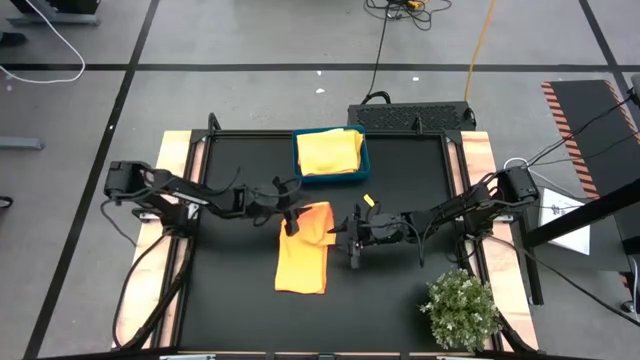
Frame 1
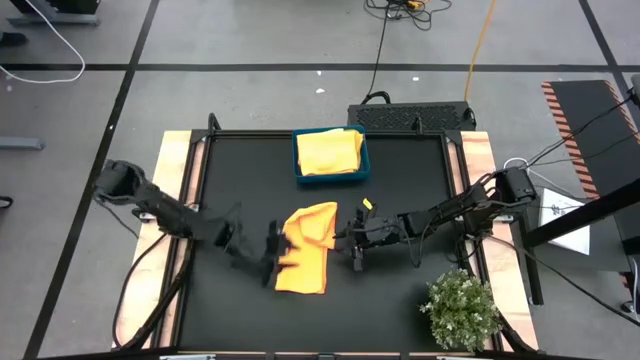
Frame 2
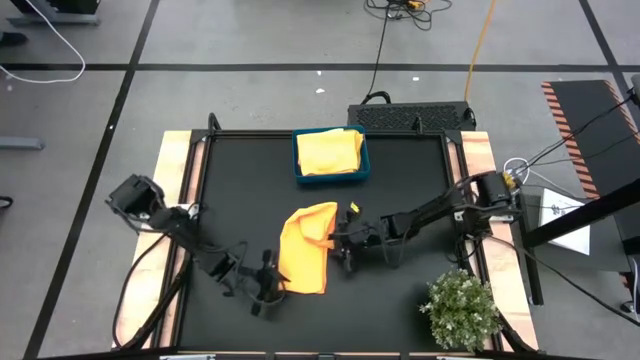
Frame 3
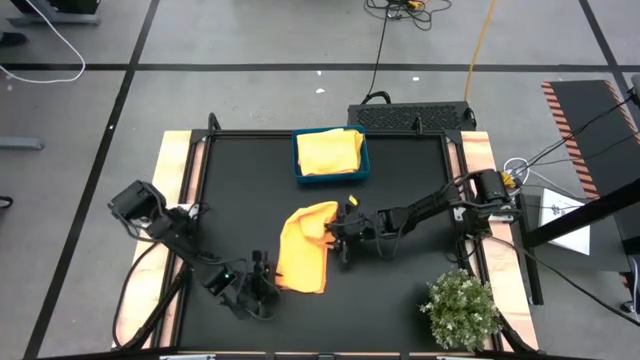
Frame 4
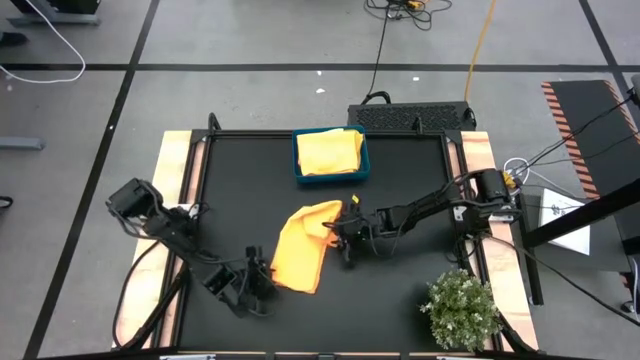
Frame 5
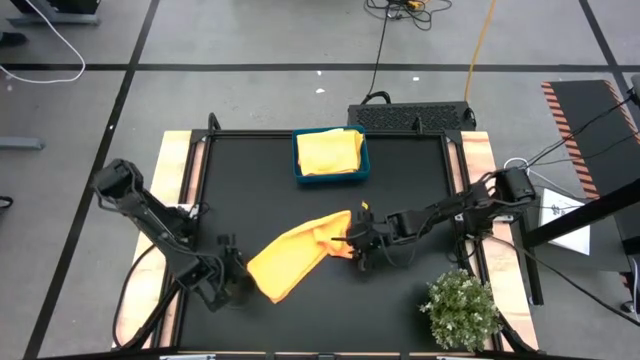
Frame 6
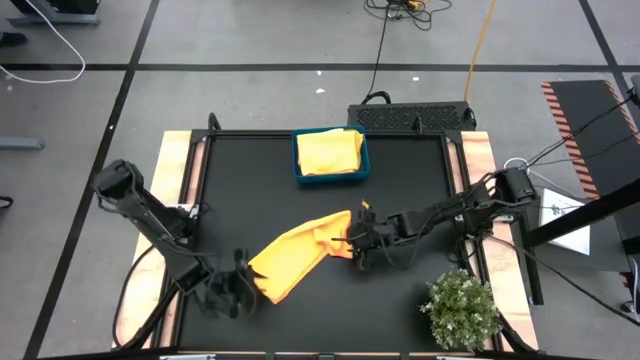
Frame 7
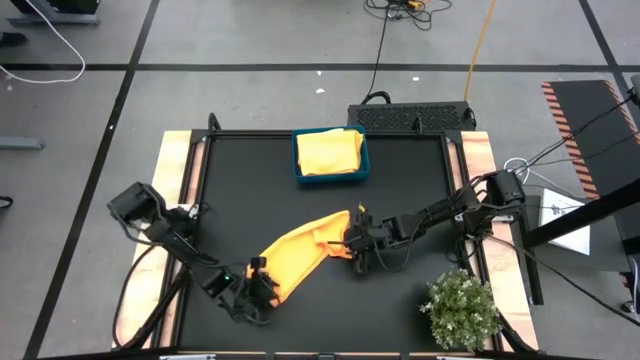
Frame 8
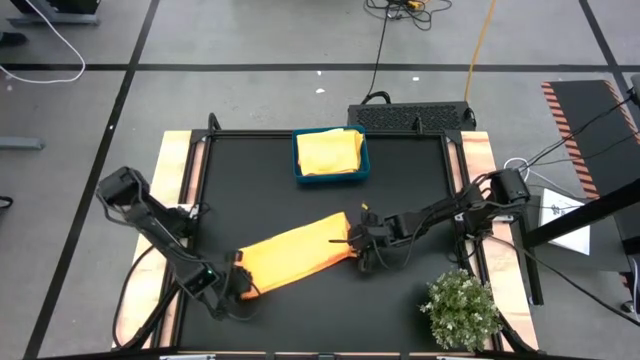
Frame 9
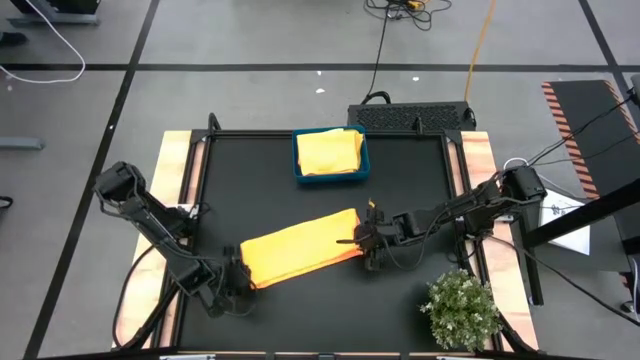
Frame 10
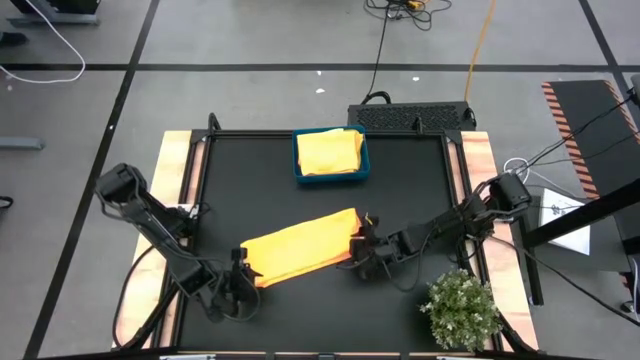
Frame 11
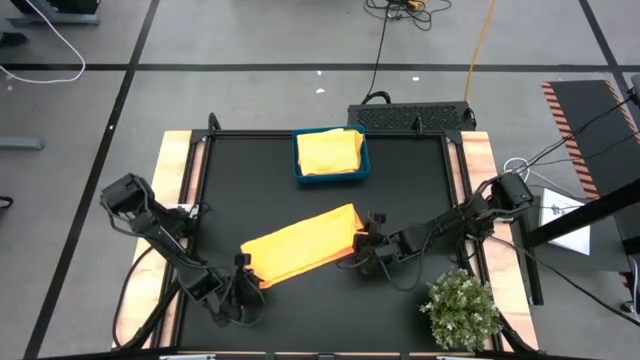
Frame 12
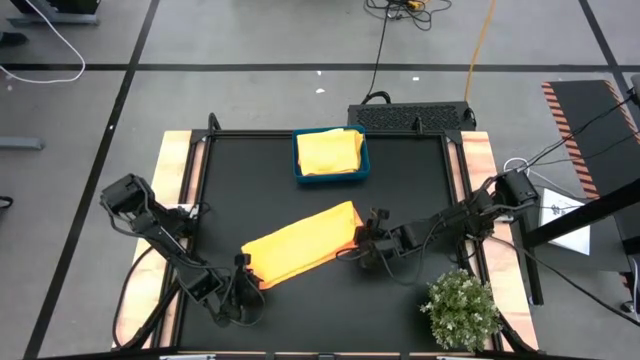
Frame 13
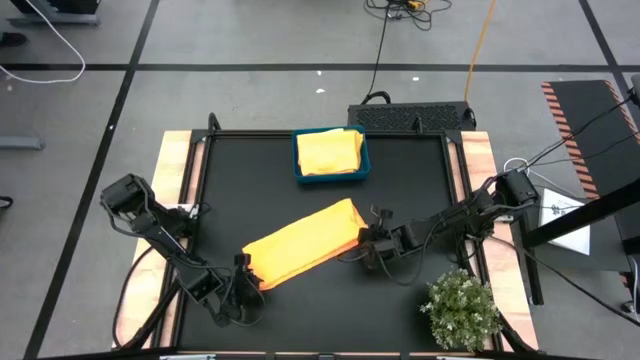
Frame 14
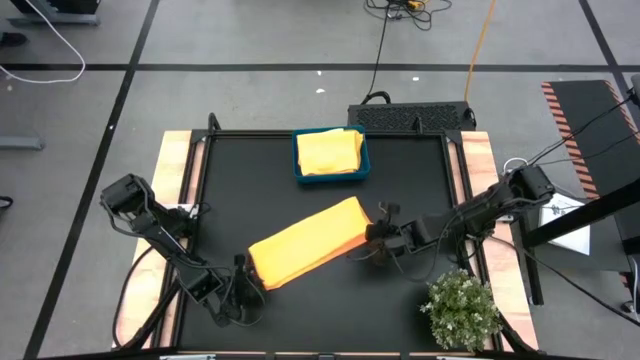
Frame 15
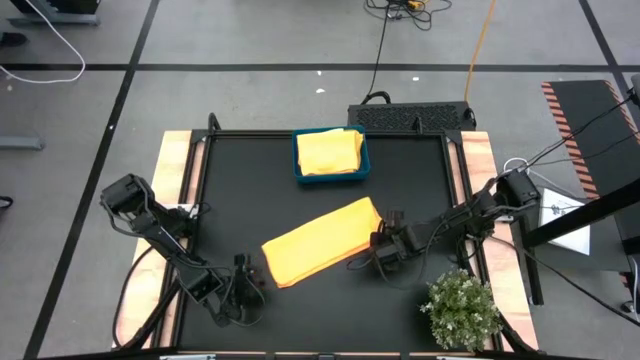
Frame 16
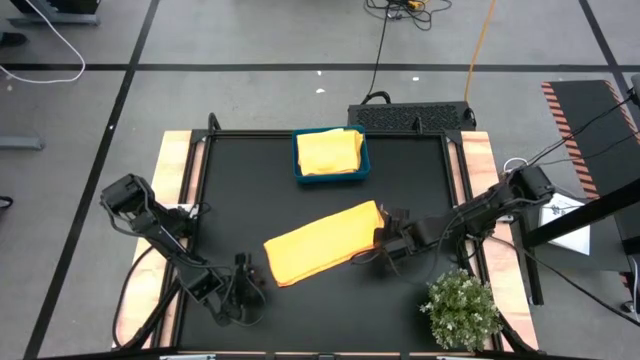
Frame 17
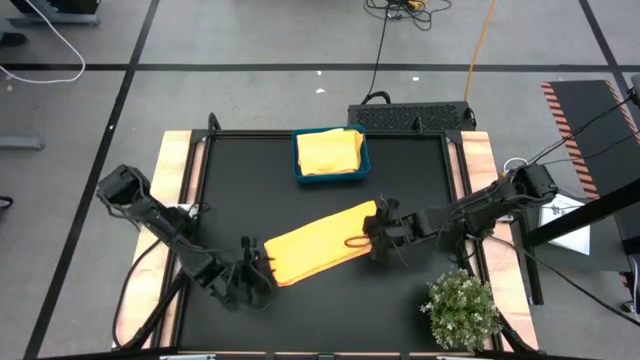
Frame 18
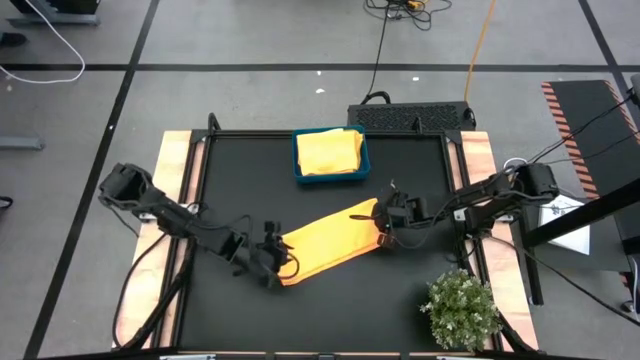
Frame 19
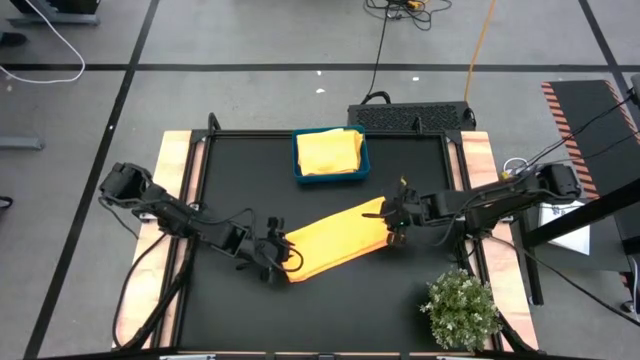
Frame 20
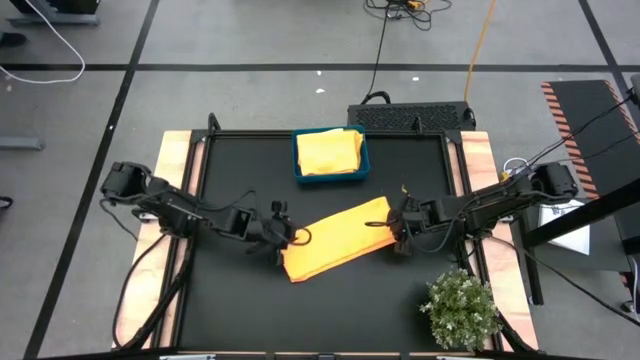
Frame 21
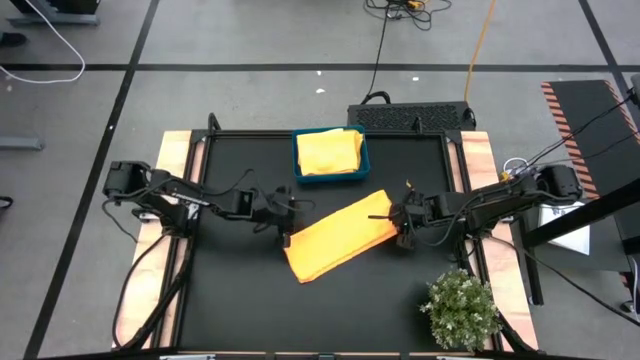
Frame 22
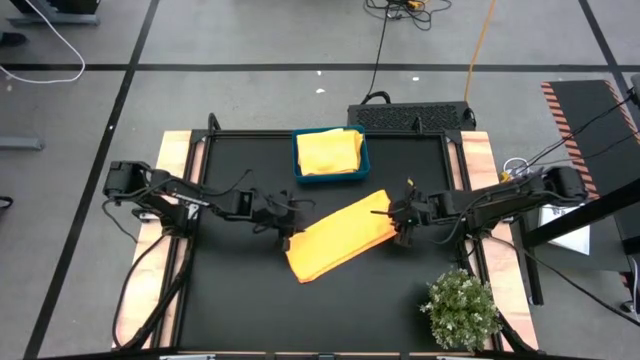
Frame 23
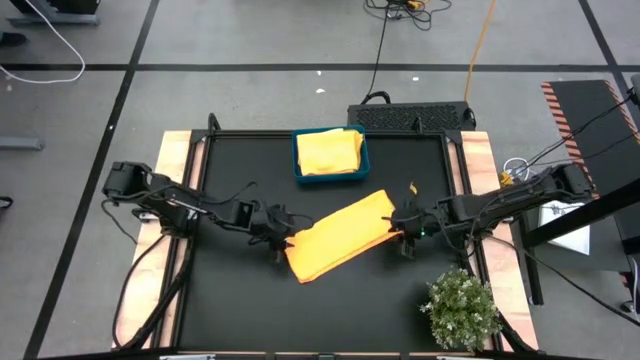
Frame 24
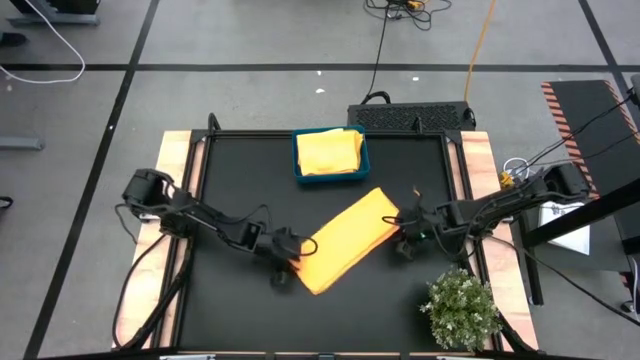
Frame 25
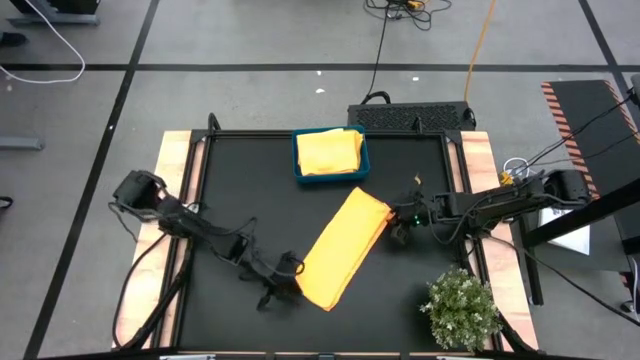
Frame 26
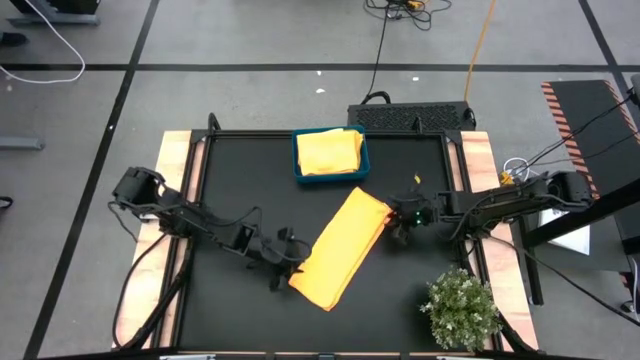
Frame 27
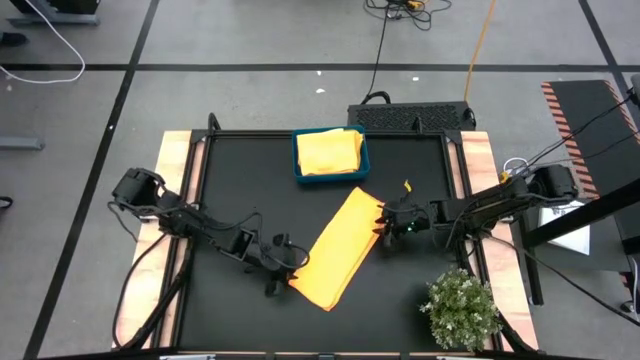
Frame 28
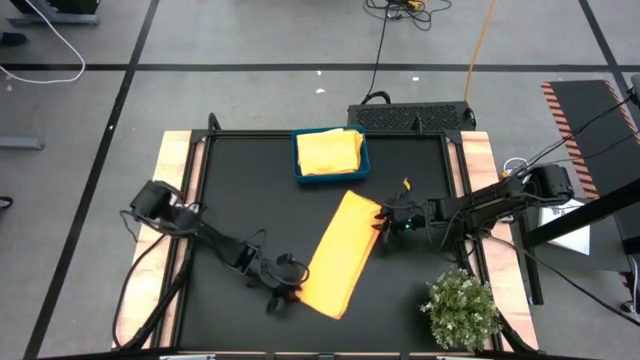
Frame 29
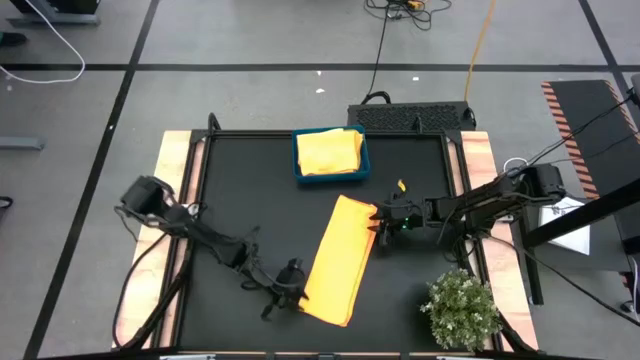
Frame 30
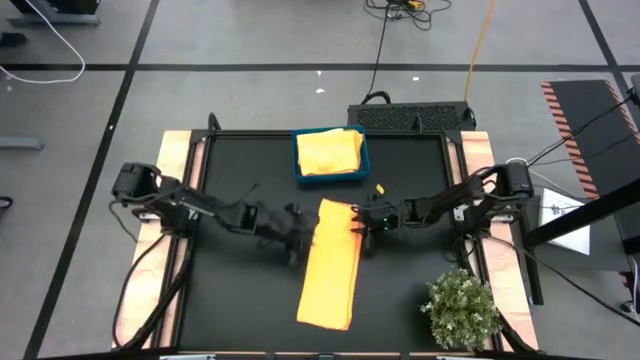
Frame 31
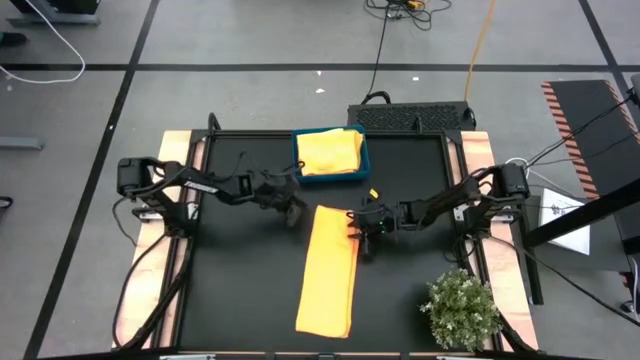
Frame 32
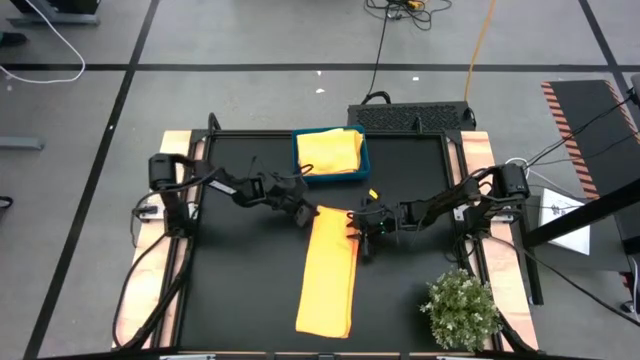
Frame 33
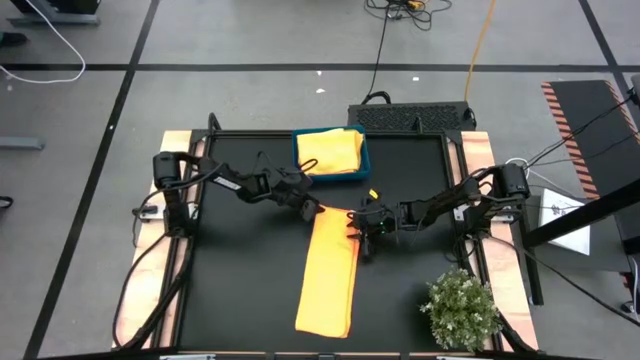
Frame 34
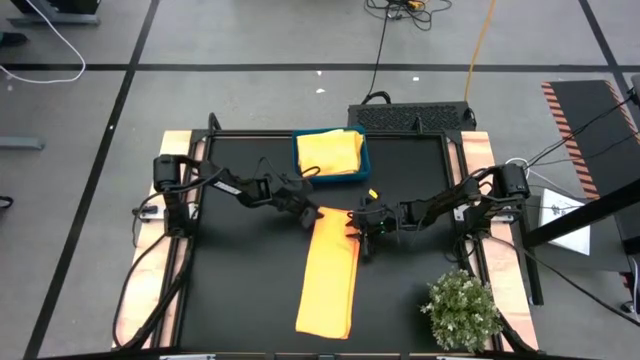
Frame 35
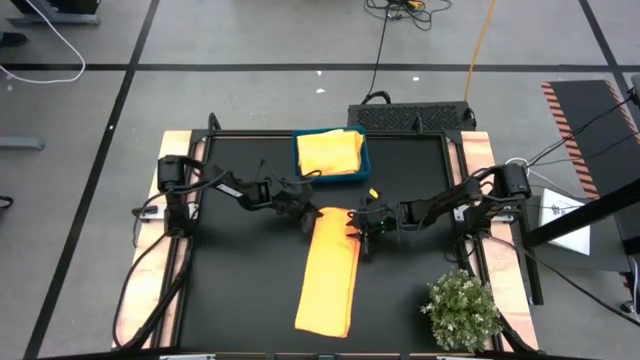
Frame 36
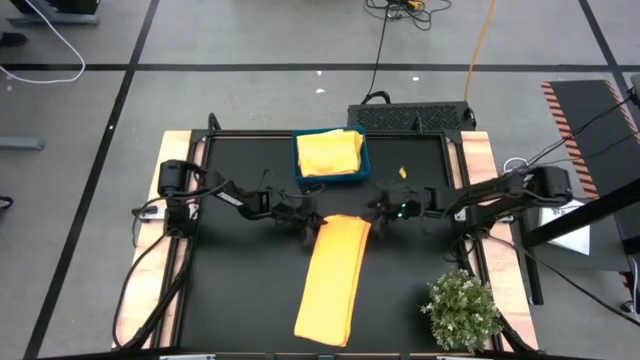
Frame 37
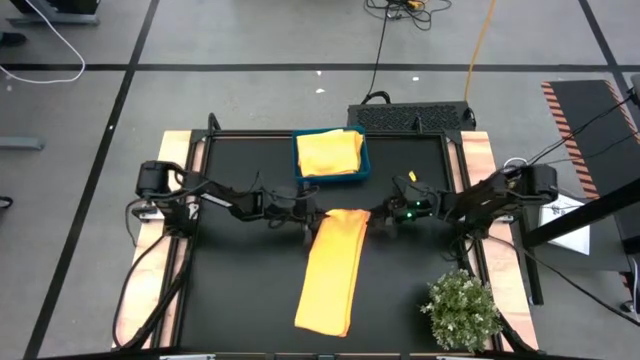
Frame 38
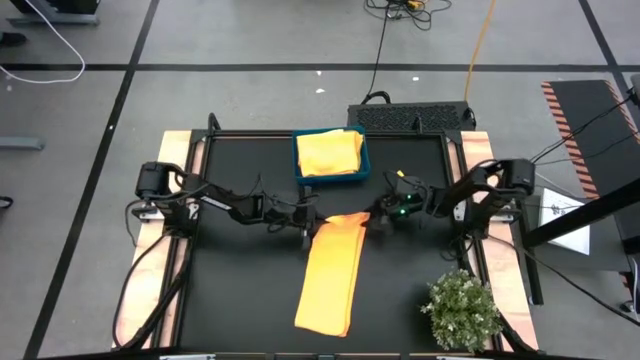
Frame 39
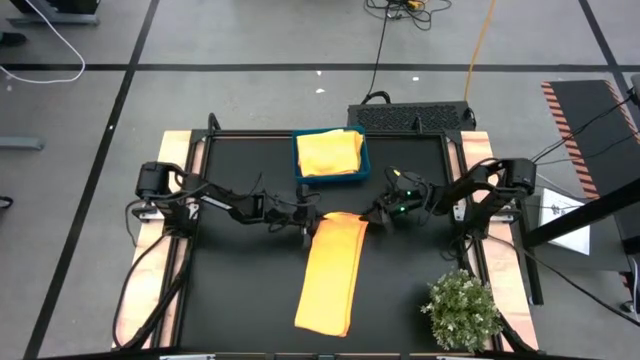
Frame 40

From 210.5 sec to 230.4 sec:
Task: Fold microfiber towels
Fold the folded orange microfiber towel

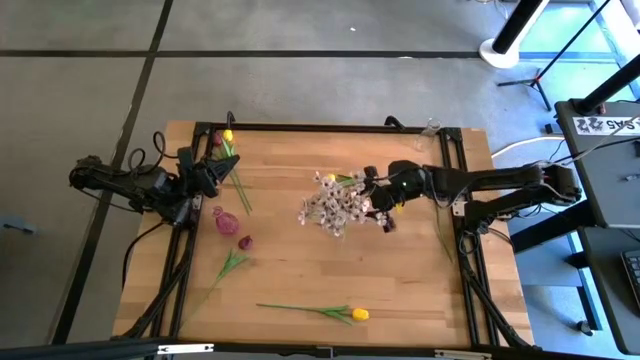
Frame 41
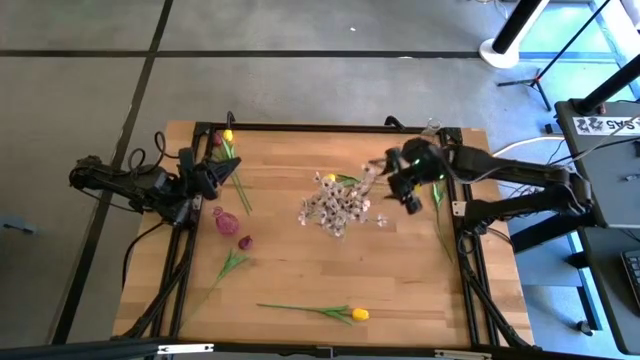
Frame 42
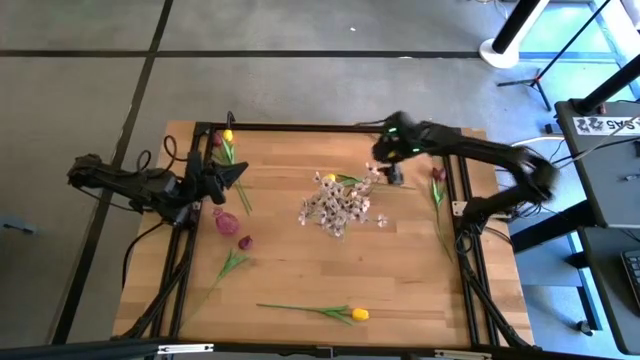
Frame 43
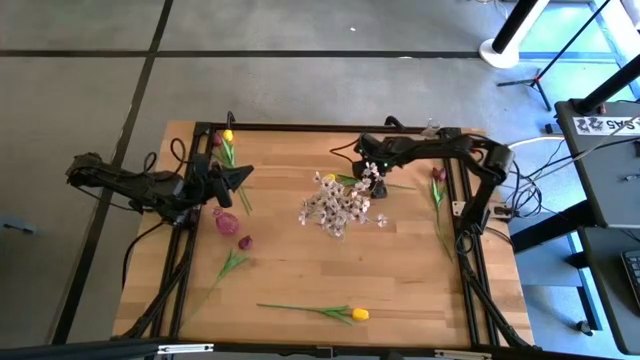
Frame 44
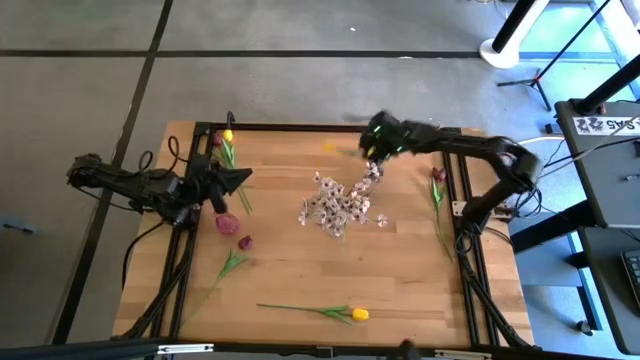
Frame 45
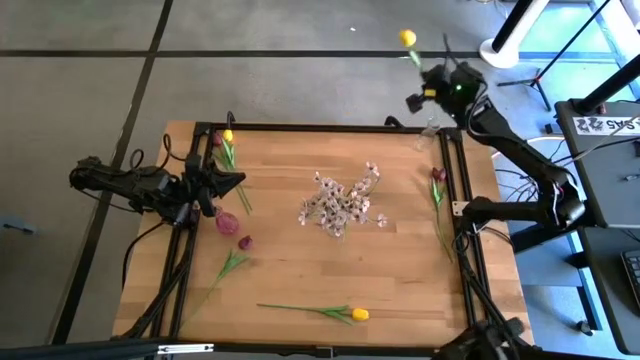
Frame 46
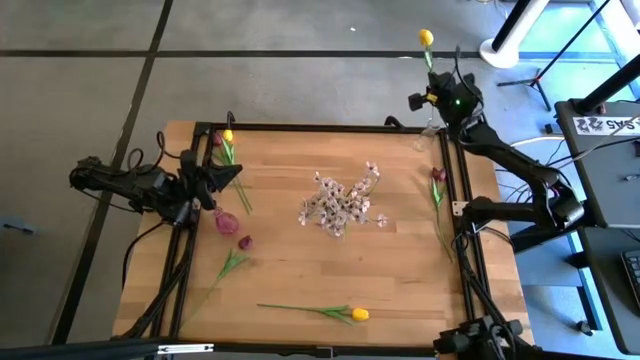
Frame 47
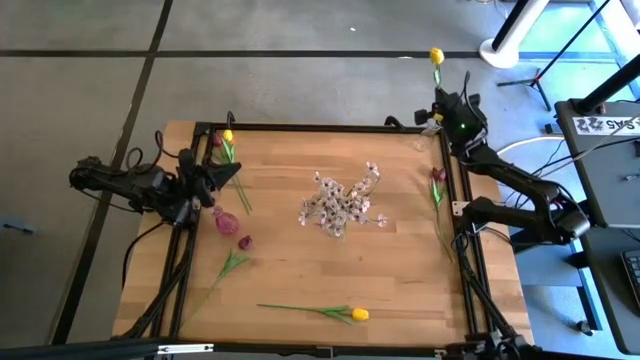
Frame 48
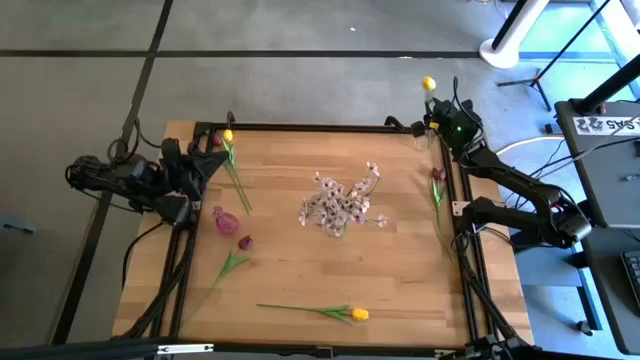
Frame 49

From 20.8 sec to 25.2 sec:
Task: Sort flowers into vase by color
Put the top right yellow tulip into the top transparent vase
